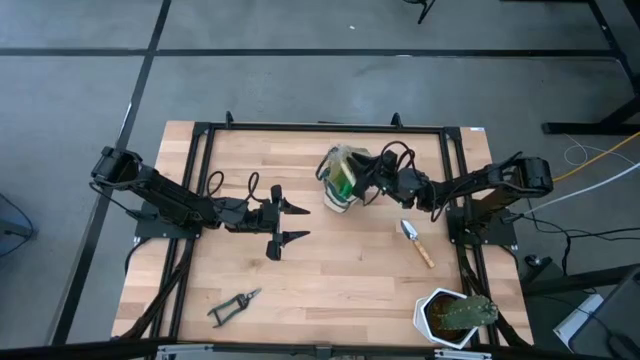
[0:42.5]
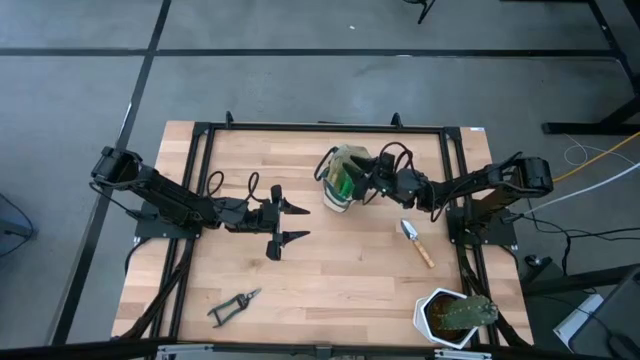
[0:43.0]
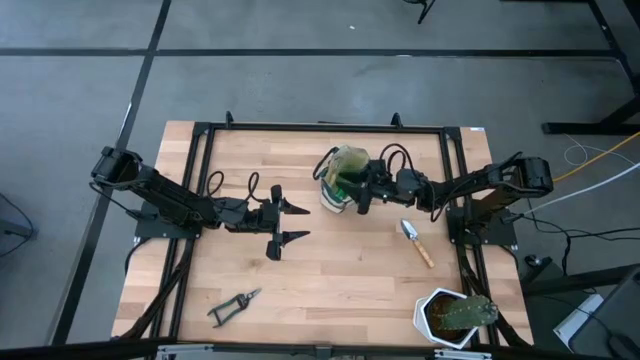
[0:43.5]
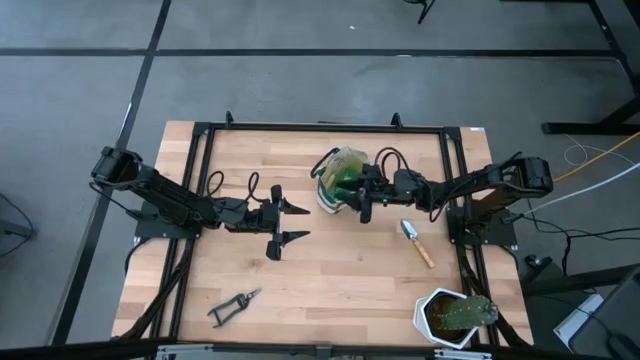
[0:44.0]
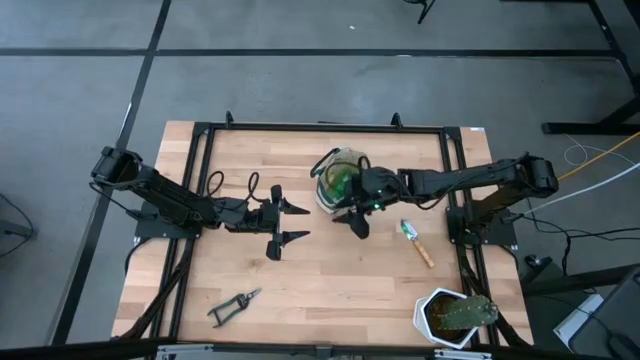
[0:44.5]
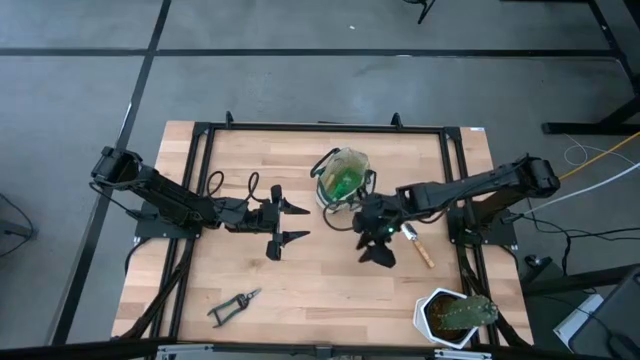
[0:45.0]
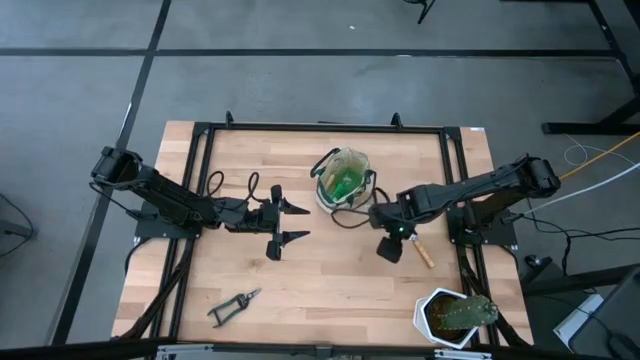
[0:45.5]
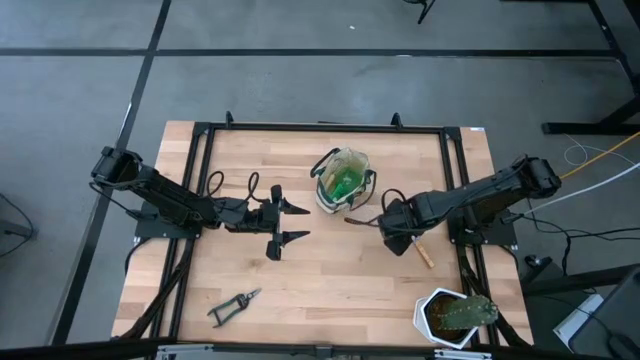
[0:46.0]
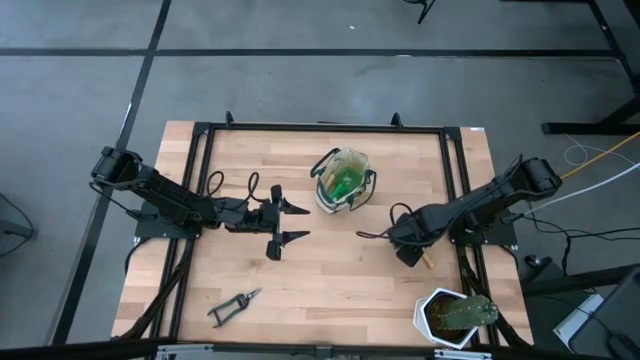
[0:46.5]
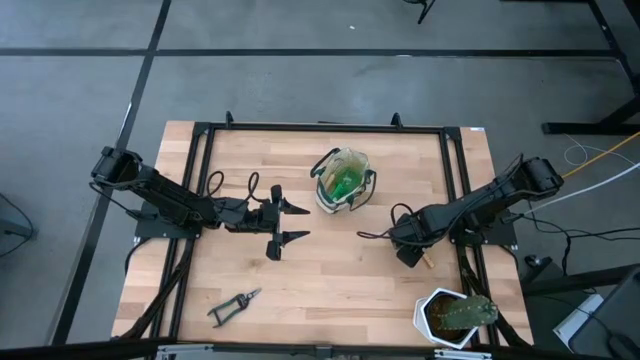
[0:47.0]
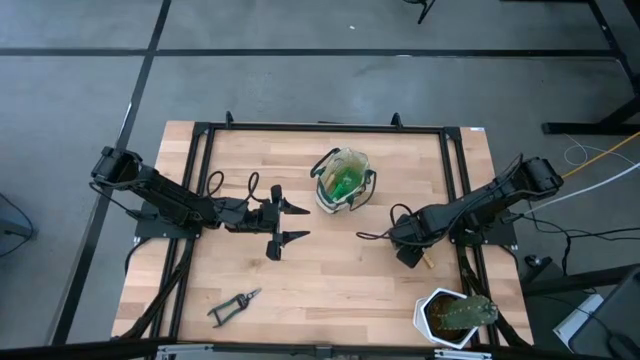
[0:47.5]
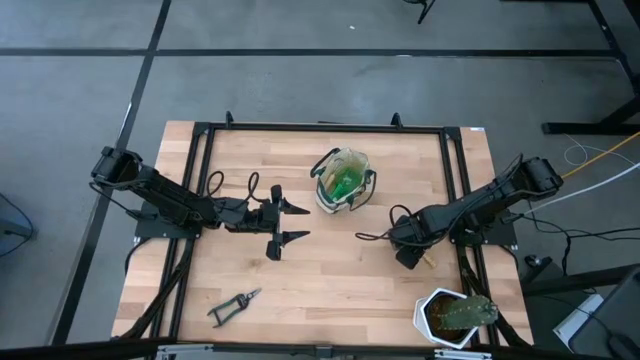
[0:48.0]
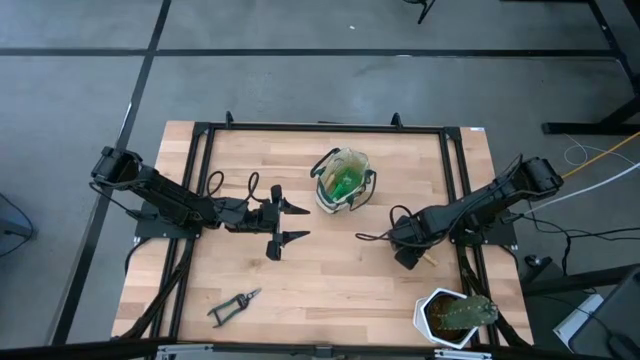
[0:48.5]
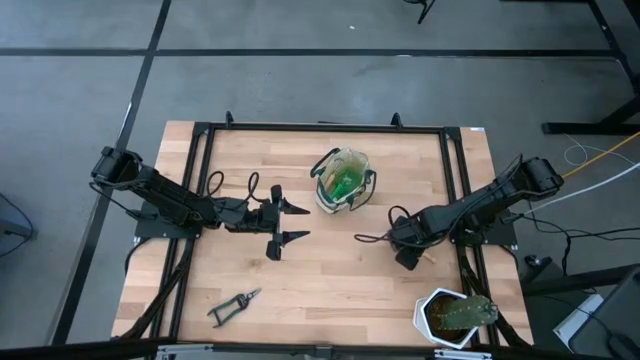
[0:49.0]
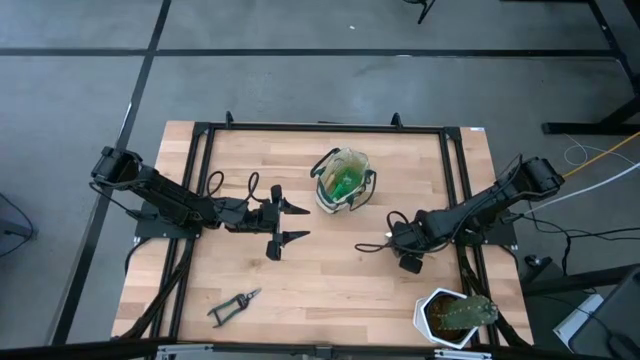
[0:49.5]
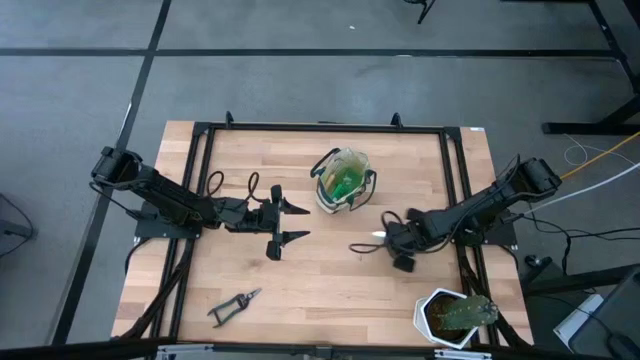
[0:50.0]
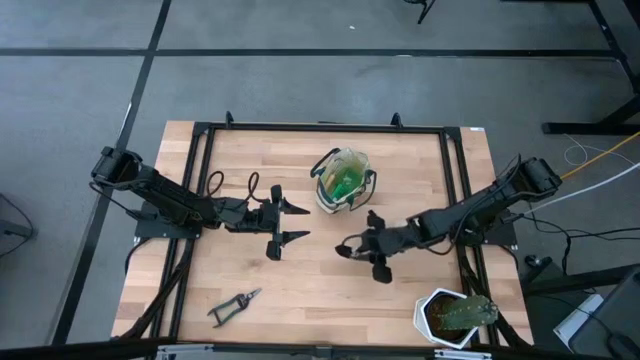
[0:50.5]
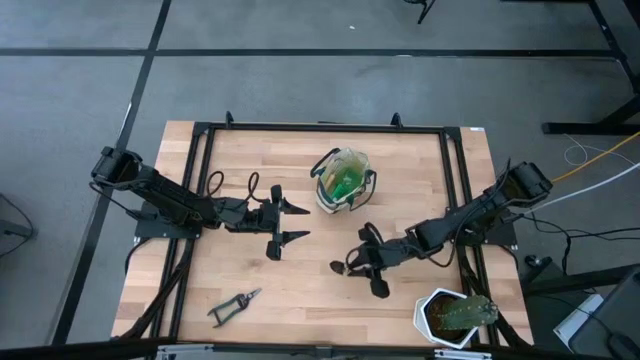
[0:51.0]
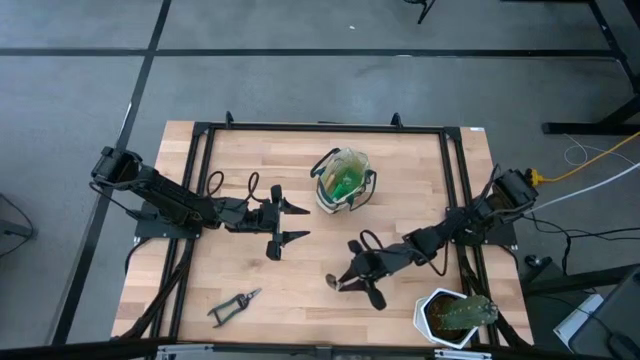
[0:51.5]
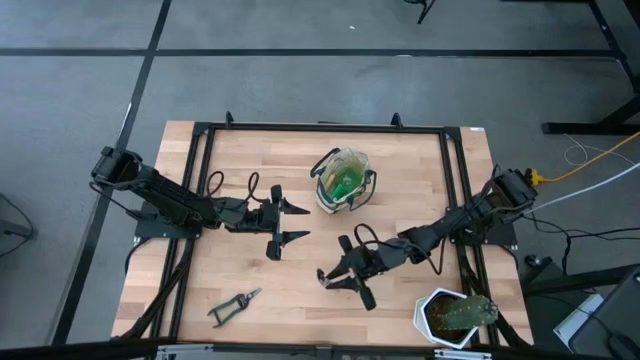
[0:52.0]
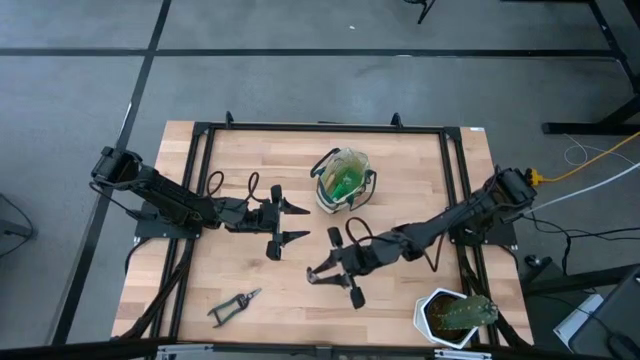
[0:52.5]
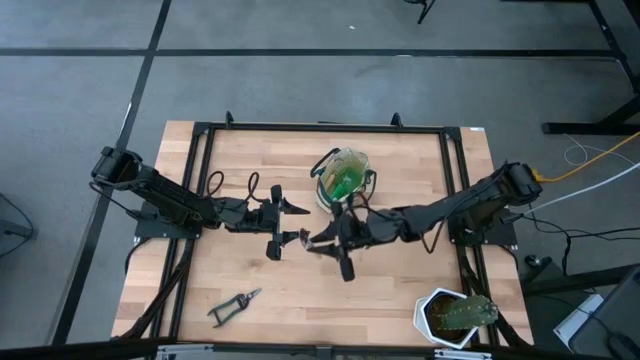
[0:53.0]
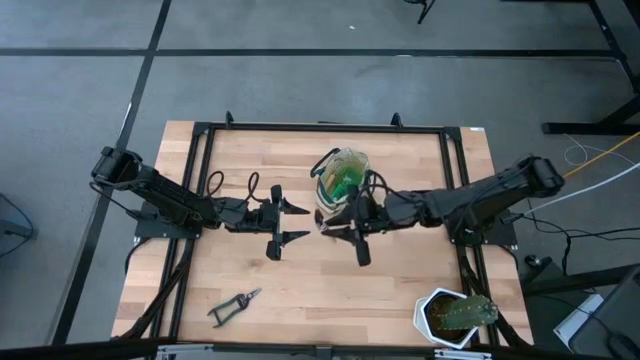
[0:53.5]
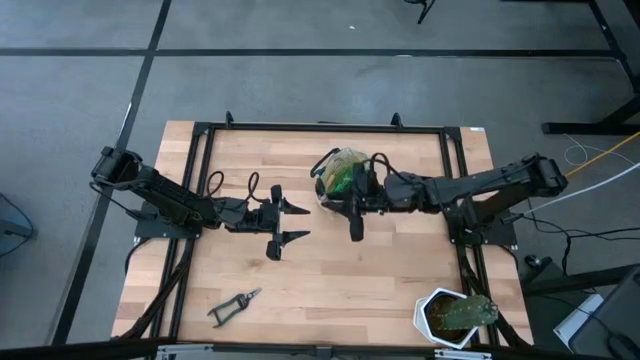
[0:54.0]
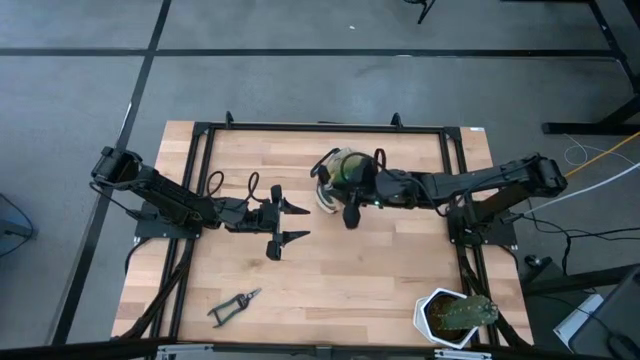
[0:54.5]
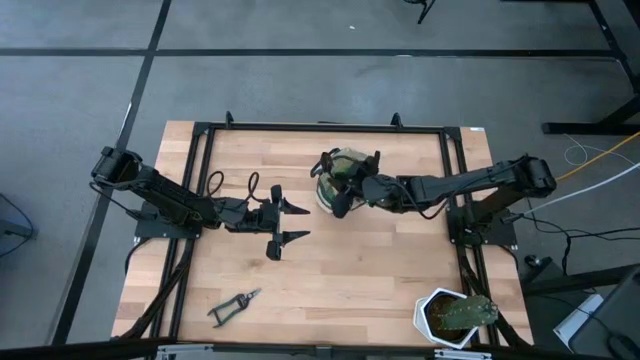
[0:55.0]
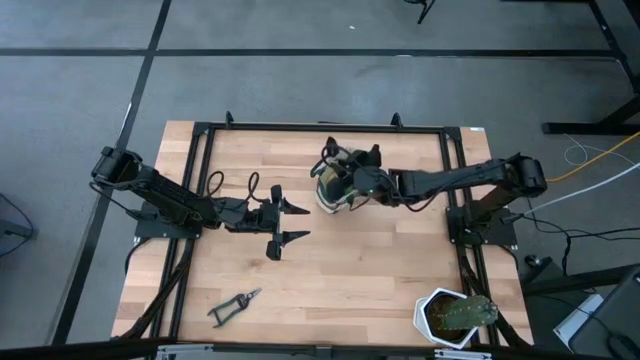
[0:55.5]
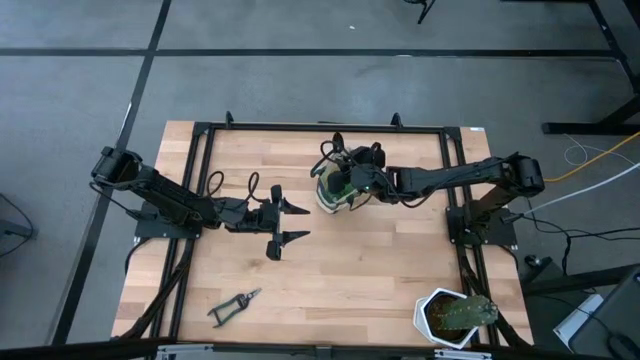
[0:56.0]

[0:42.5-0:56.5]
Task: Pick & Place Garden tools in Gardening bag
Put the trowel into the gardening bag

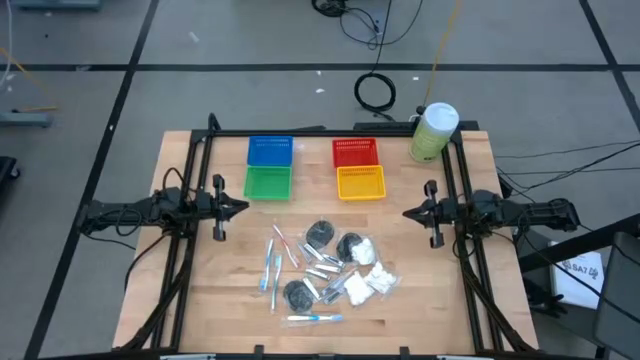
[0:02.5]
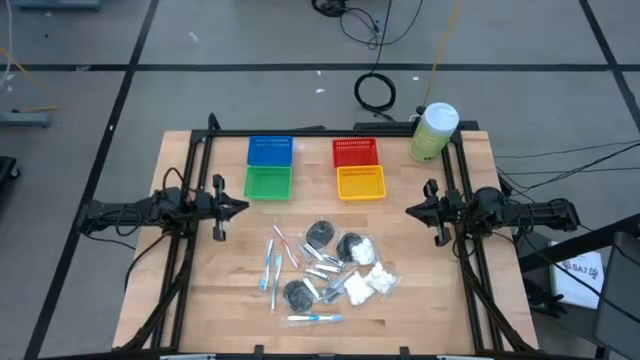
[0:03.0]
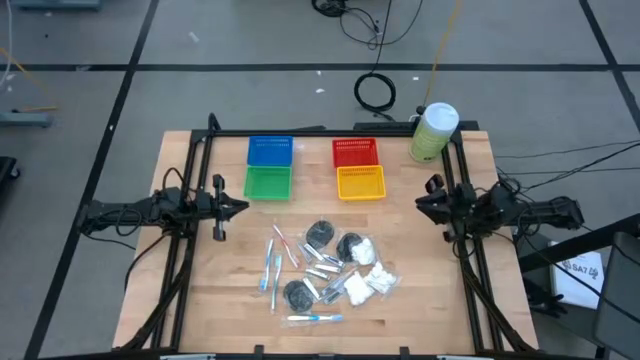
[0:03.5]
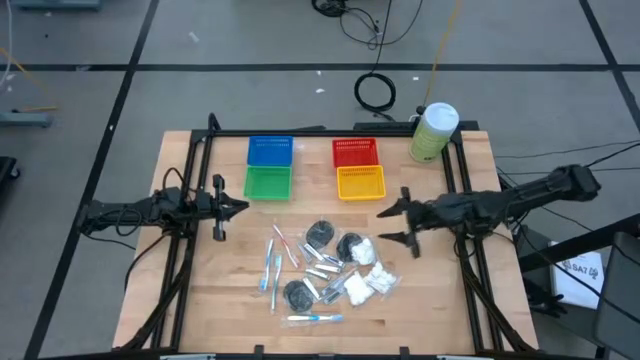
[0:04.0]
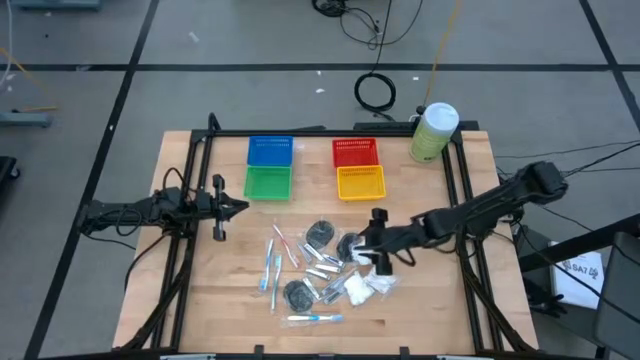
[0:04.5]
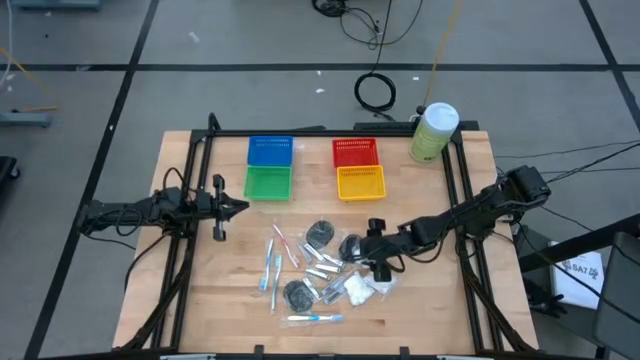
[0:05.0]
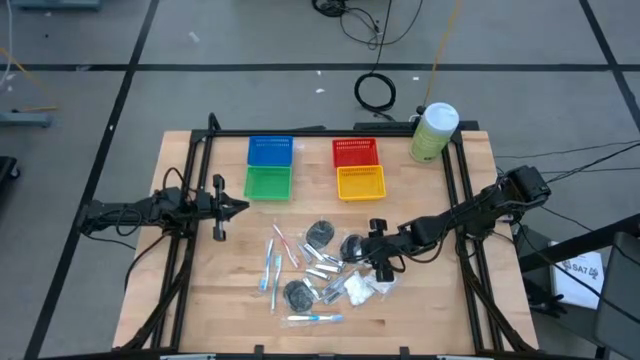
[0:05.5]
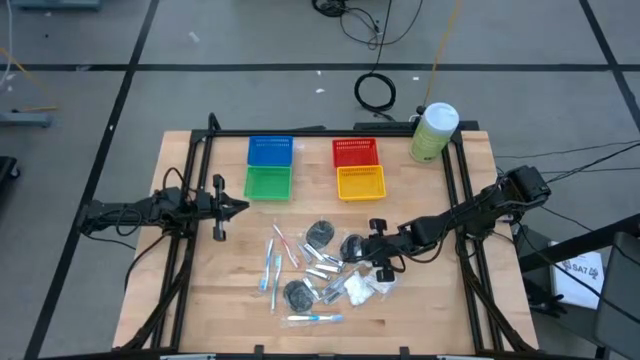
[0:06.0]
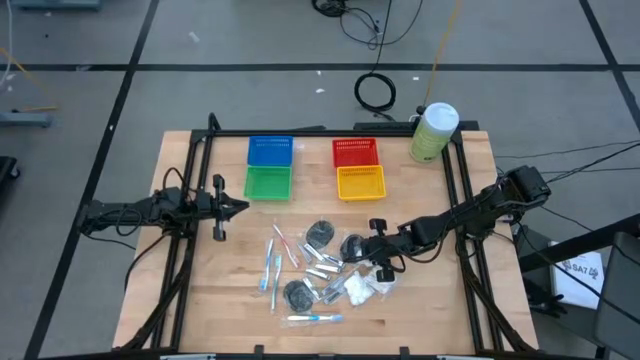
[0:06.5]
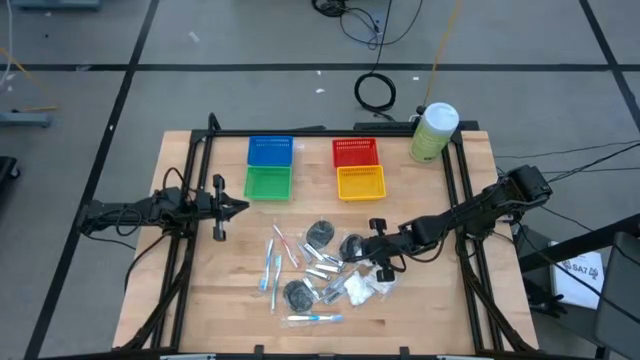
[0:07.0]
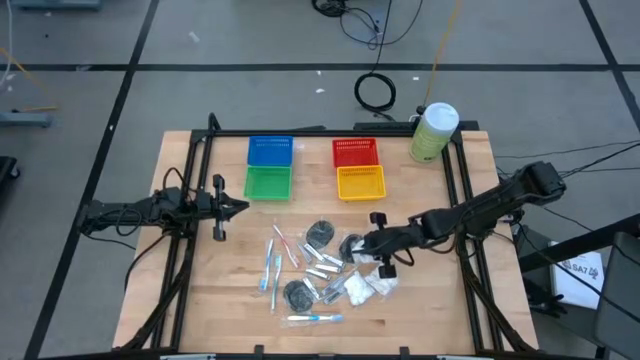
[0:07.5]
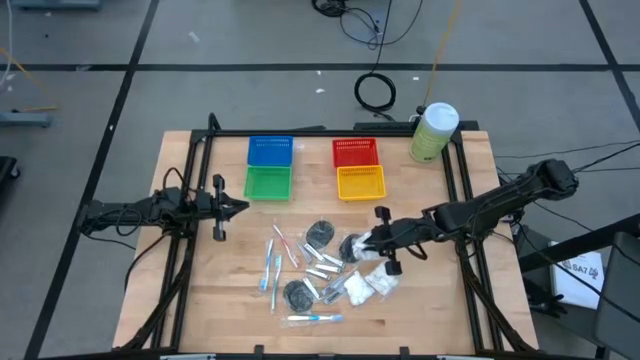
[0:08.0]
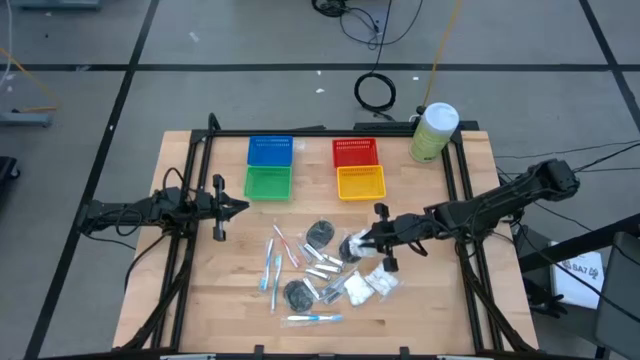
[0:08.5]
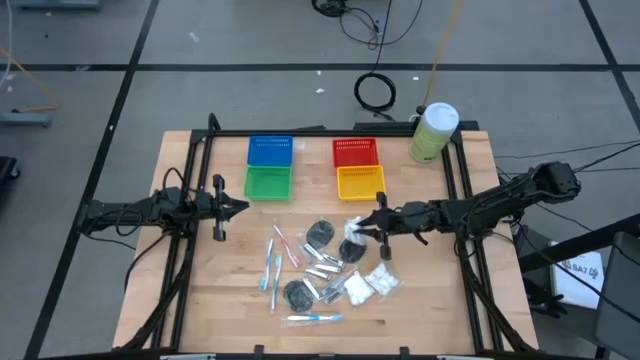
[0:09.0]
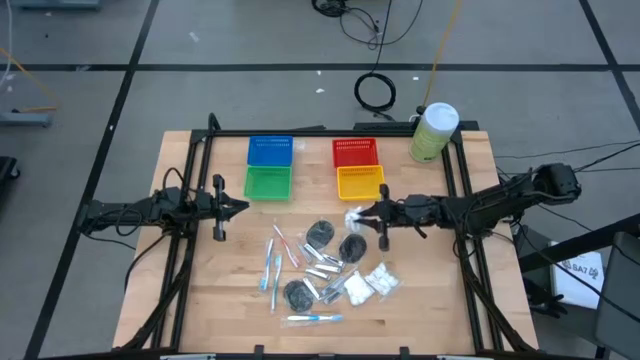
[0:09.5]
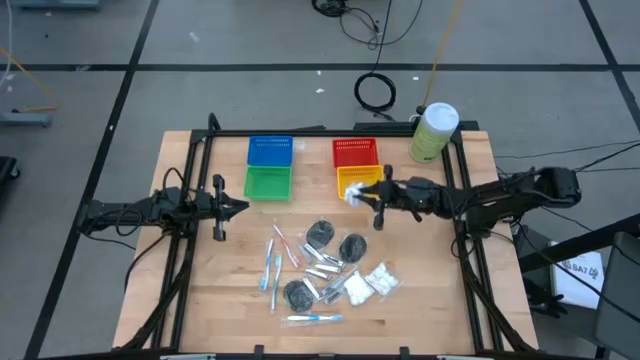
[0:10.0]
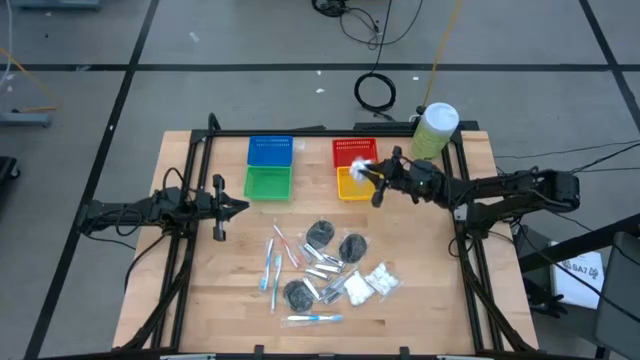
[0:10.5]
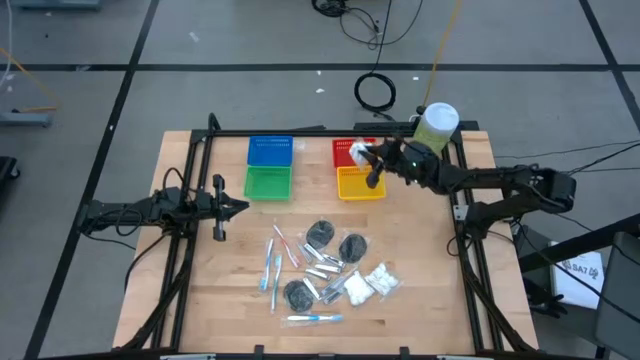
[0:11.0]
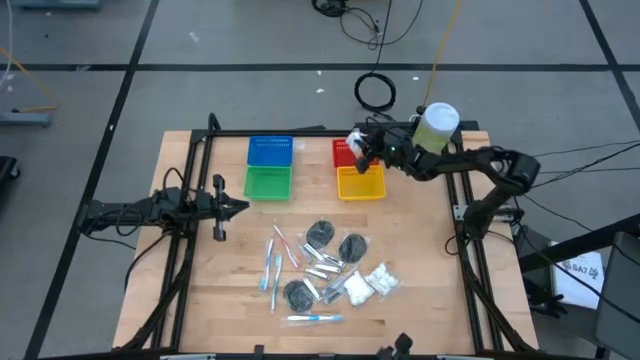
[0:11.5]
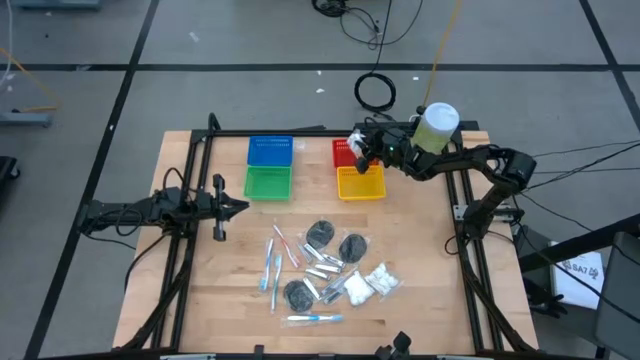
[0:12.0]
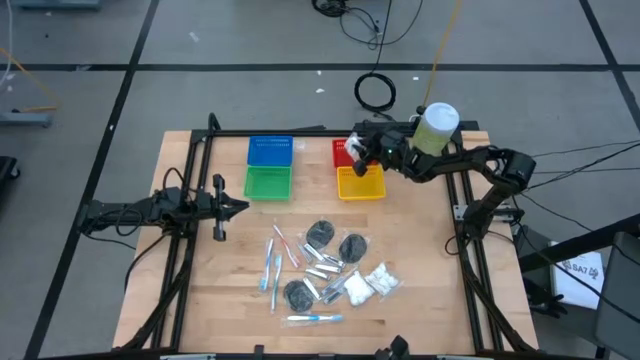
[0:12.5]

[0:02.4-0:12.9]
Task: Pick & Place Travel size toiletries
Put the cotton pack into the red bin
